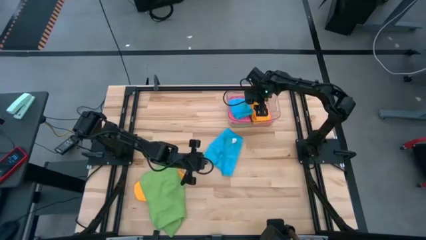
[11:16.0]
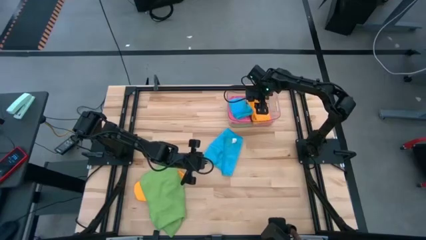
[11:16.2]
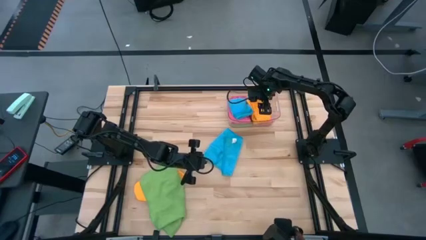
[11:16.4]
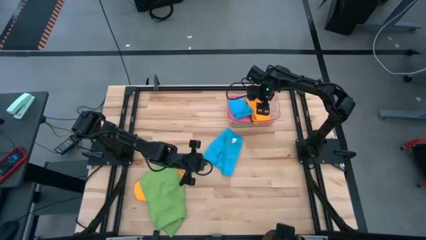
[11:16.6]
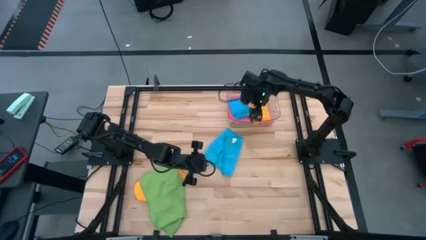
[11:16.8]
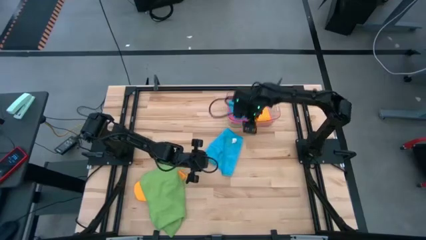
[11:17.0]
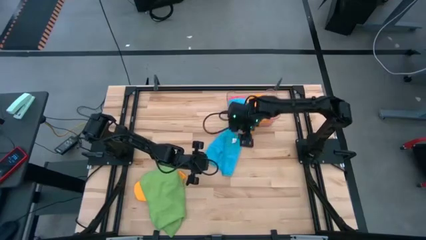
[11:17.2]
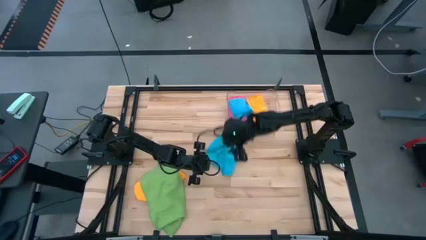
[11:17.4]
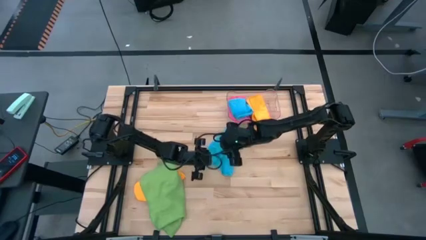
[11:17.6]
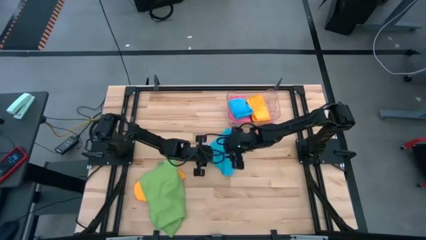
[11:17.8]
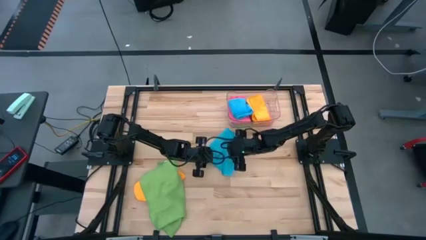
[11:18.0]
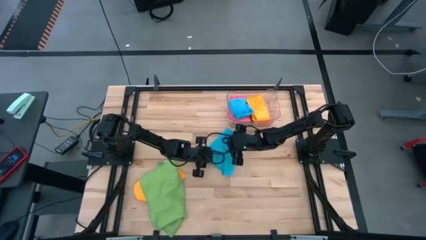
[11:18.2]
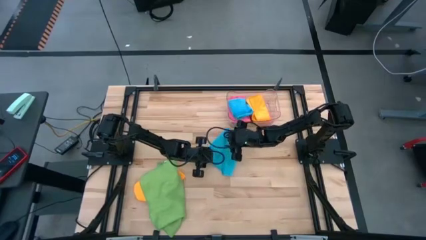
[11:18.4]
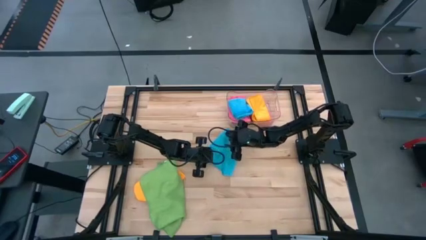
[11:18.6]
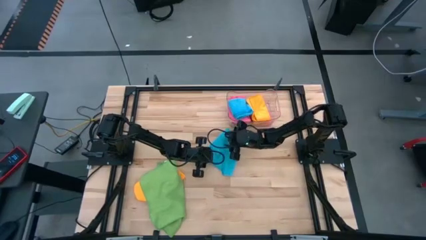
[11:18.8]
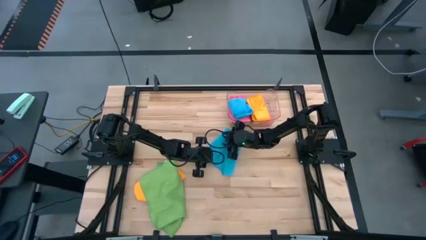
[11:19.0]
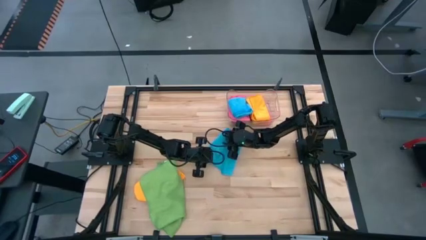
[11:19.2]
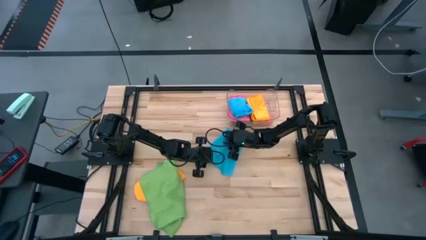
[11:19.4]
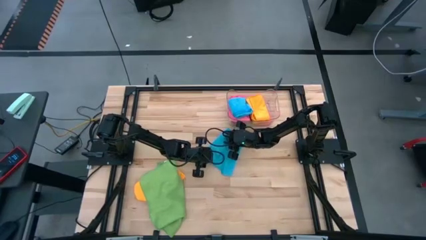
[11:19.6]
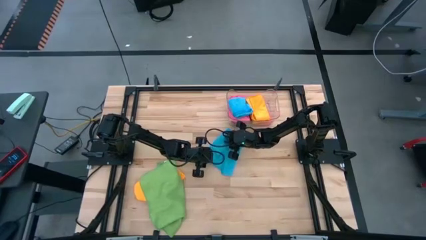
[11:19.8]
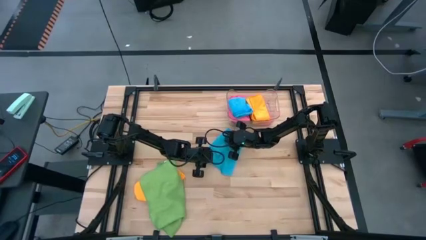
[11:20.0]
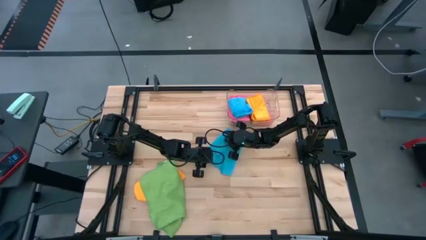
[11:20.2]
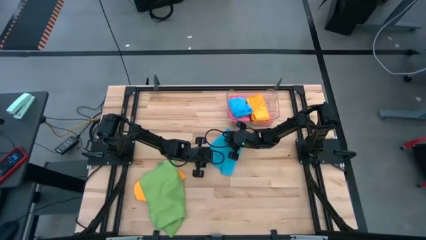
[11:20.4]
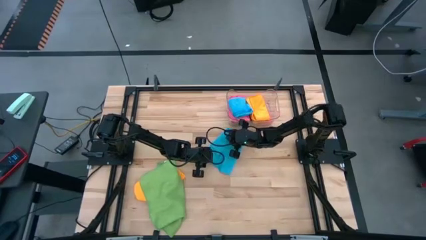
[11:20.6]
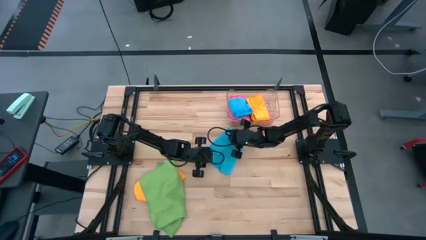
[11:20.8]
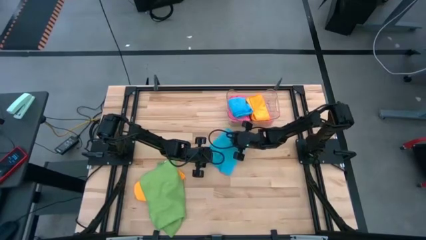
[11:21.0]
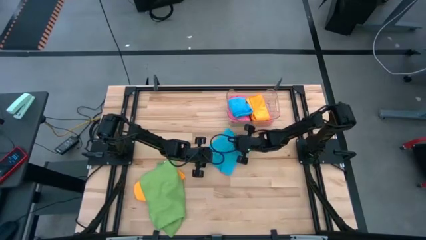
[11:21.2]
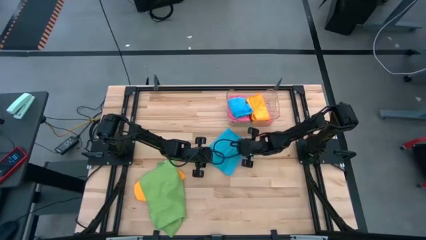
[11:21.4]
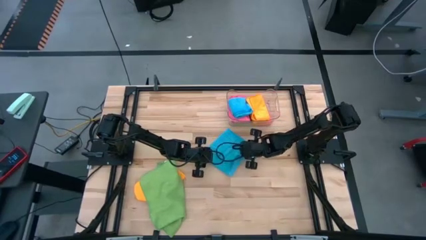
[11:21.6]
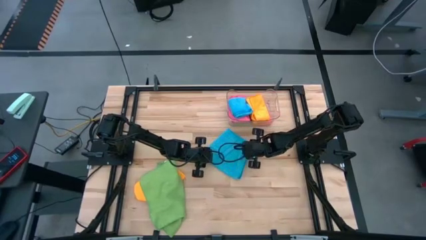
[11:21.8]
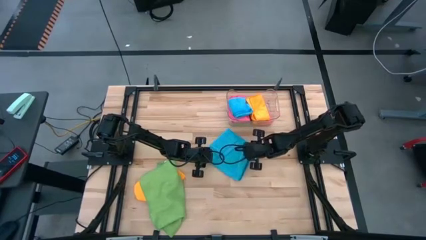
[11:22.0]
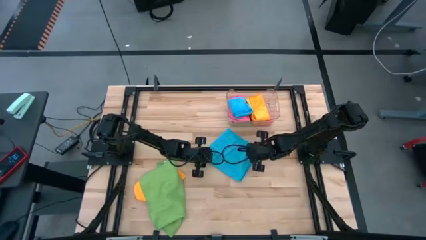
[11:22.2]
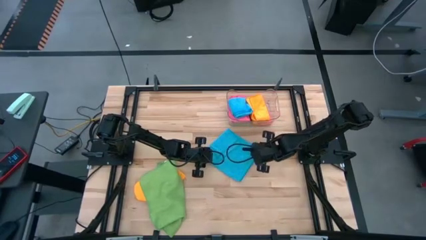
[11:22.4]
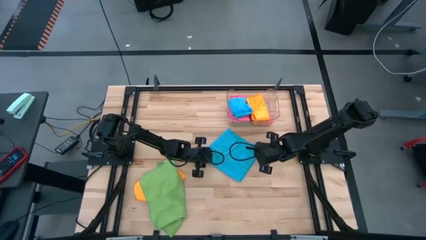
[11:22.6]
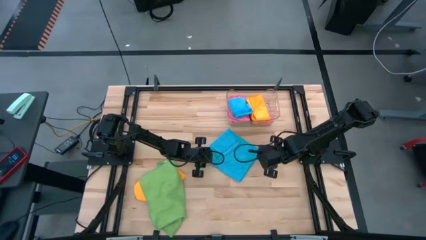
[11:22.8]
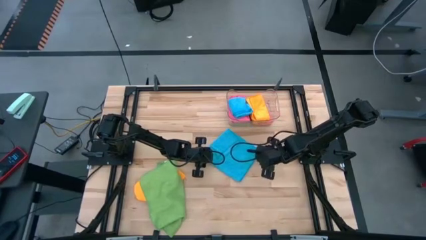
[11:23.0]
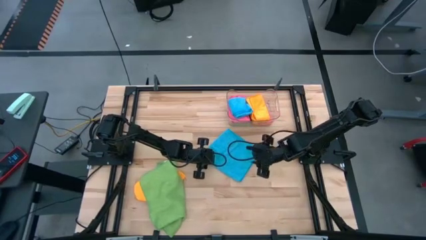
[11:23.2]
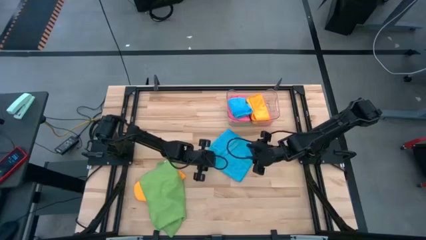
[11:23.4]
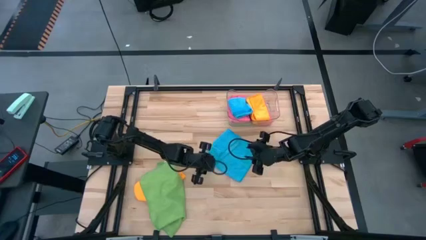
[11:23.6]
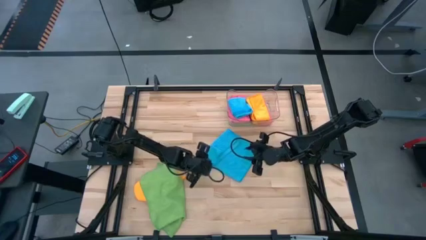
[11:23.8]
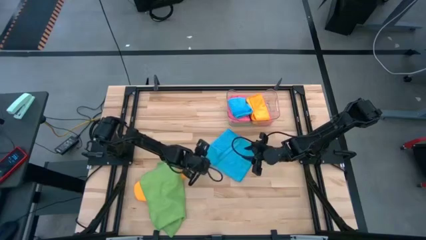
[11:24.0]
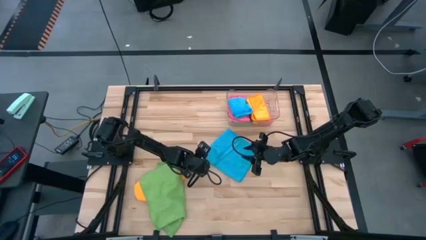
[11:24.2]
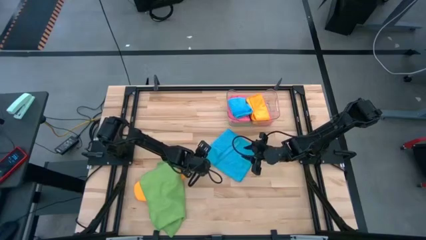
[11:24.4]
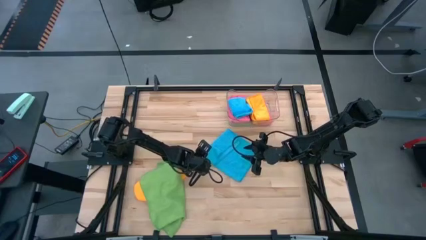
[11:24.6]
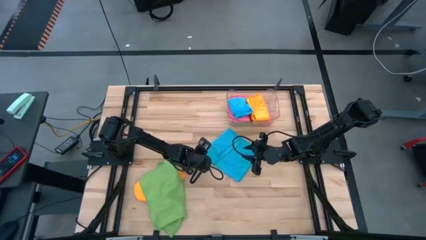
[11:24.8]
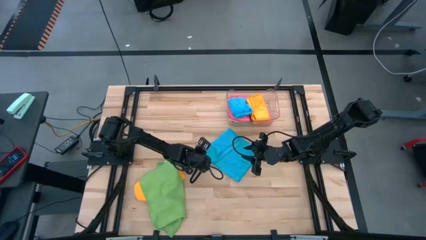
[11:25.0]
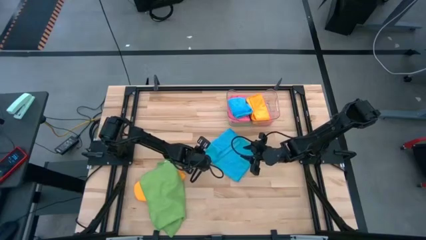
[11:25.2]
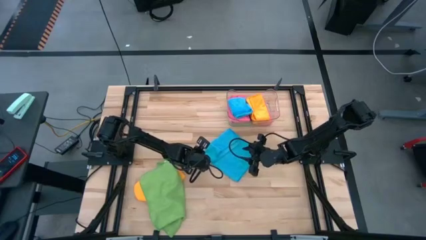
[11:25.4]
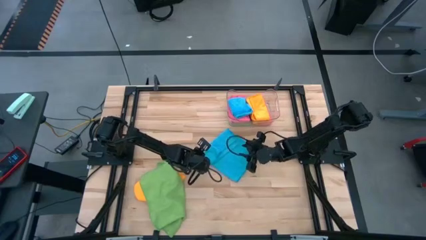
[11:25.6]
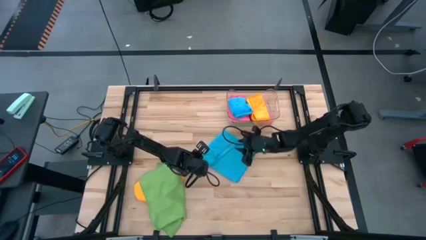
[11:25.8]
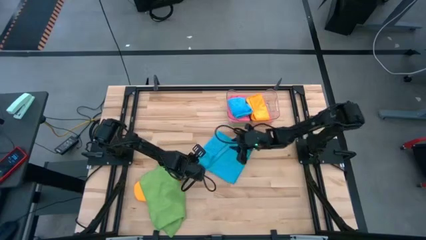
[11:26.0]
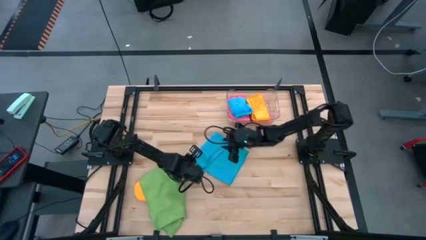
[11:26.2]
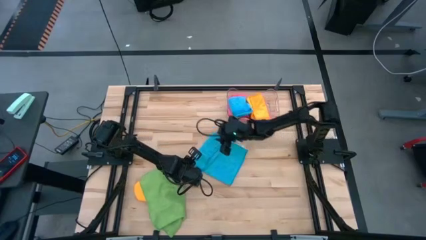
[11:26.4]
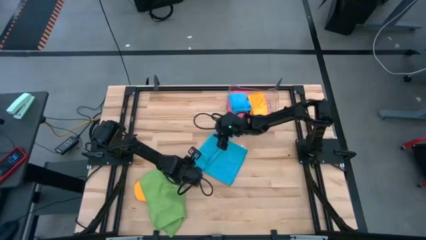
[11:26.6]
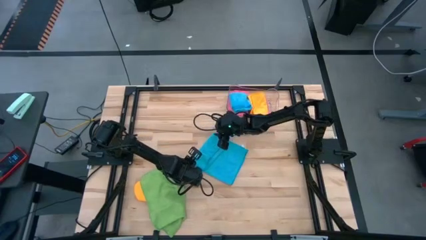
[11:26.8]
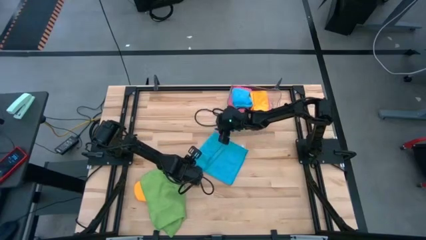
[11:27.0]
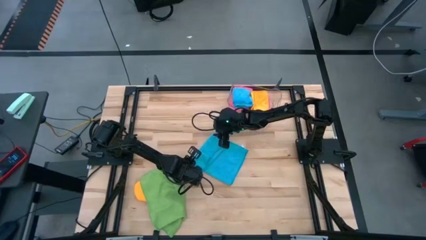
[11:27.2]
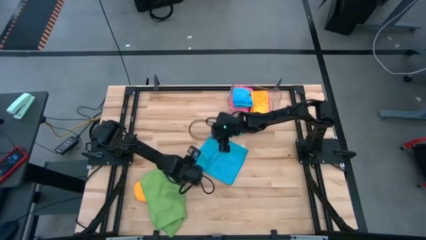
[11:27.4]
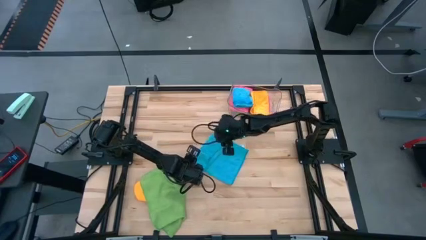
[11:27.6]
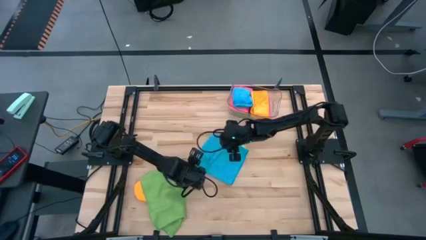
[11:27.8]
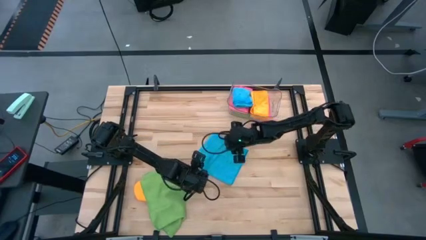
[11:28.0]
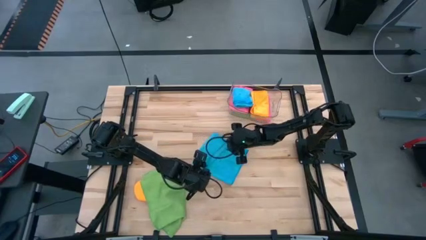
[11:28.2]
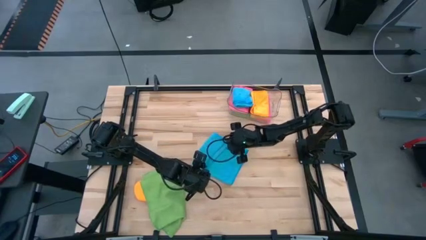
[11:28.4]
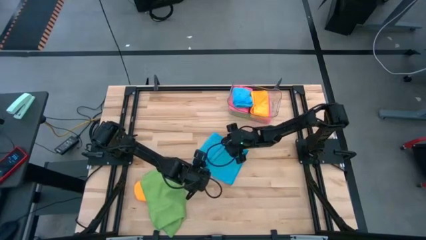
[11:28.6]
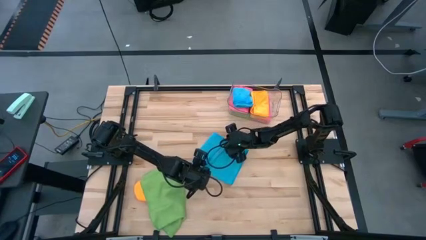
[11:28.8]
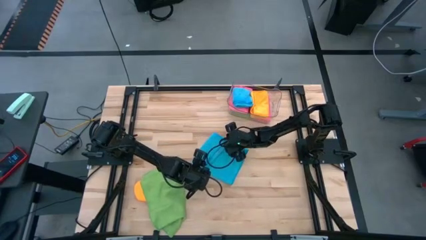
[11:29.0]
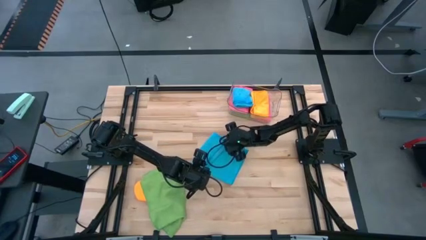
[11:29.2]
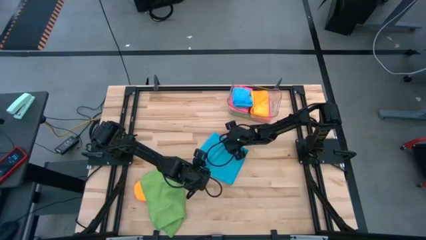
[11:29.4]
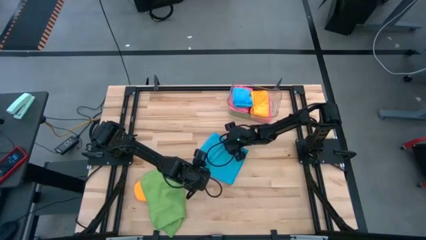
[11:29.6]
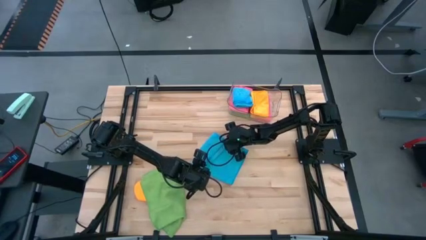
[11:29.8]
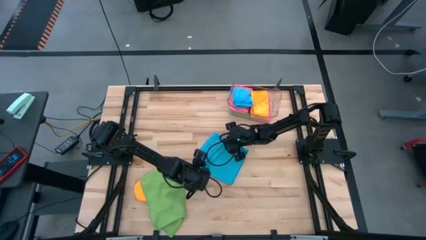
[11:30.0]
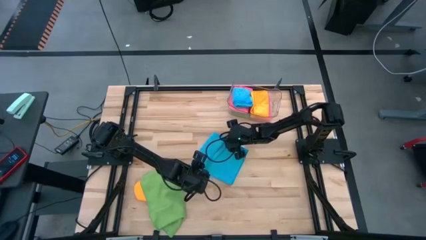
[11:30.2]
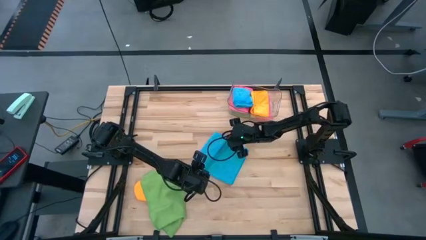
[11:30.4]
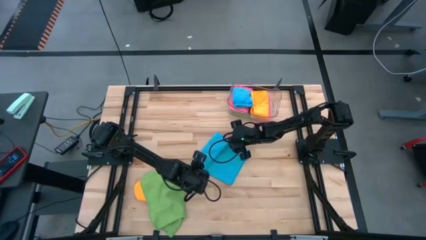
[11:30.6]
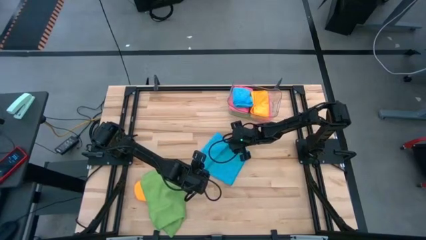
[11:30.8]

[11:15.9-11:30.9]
Task: Fold microfiber towels
Fold the blue towel
